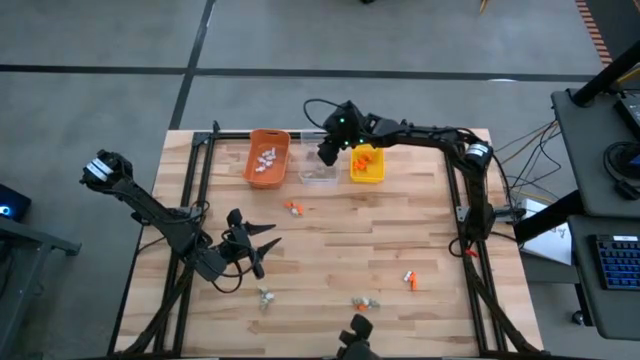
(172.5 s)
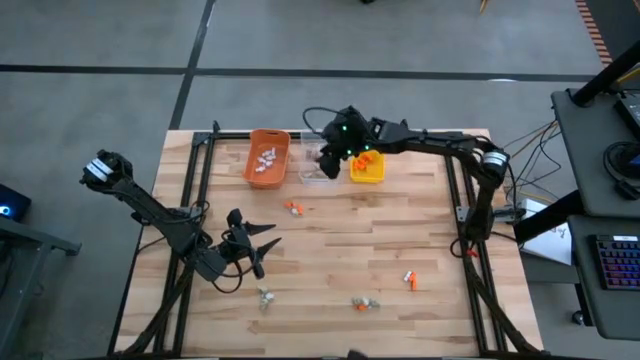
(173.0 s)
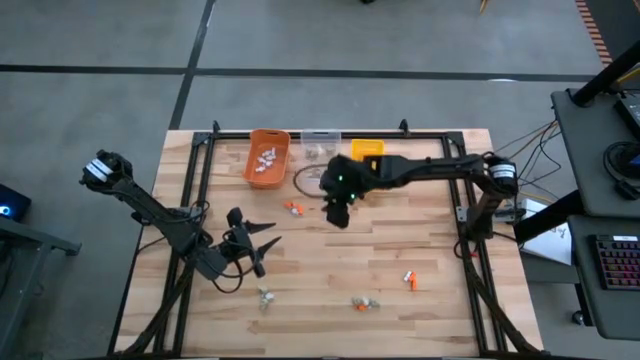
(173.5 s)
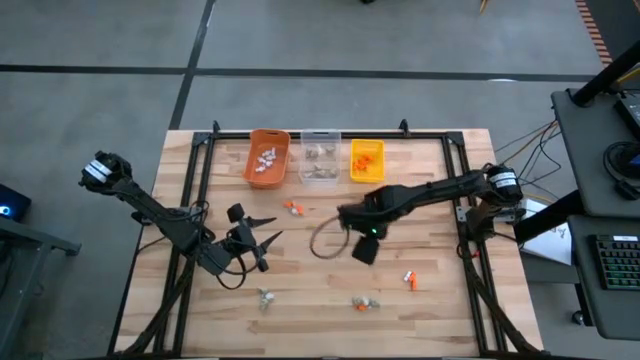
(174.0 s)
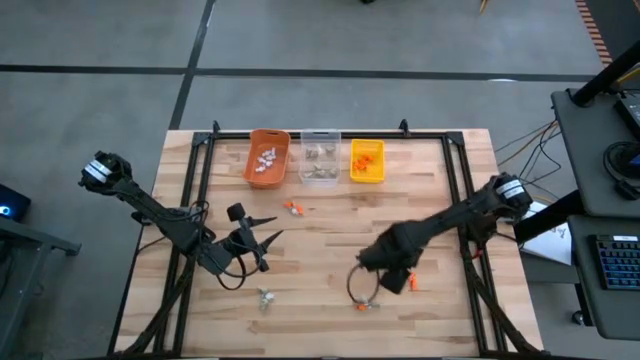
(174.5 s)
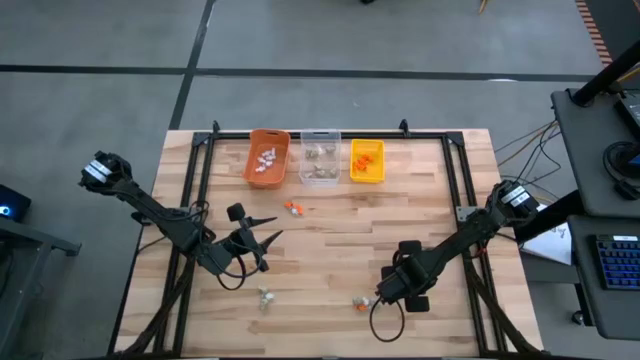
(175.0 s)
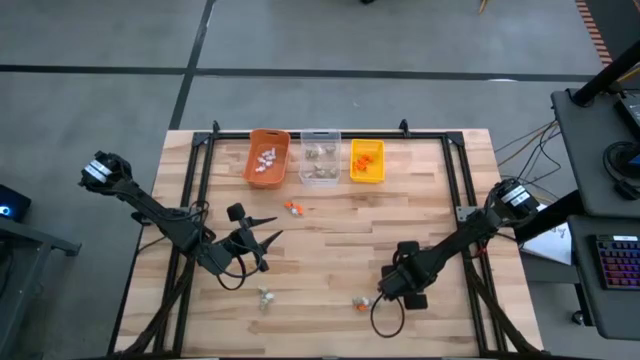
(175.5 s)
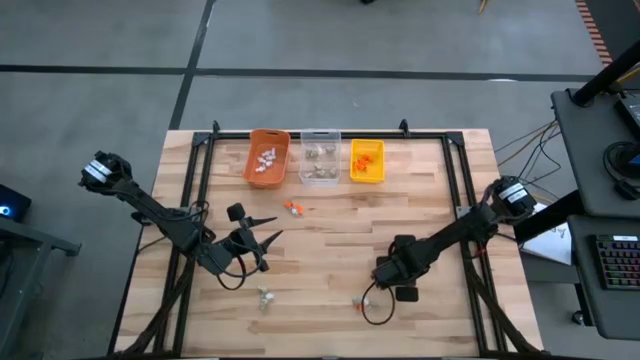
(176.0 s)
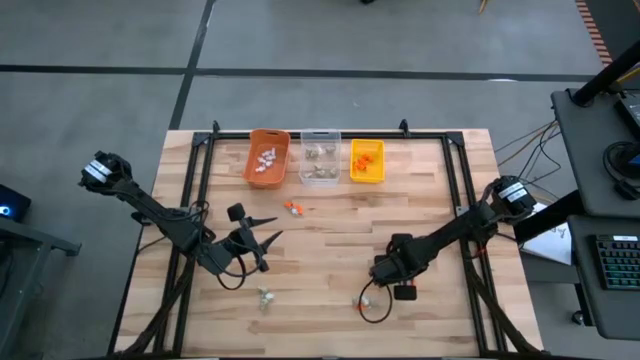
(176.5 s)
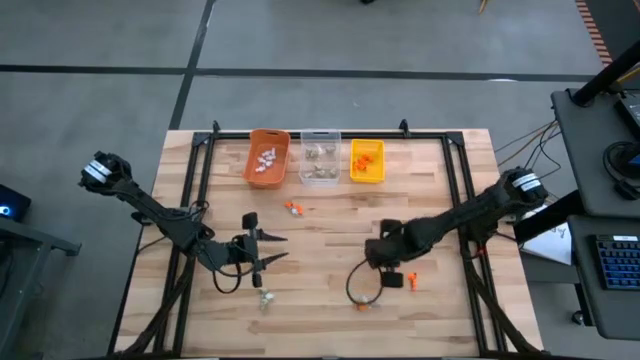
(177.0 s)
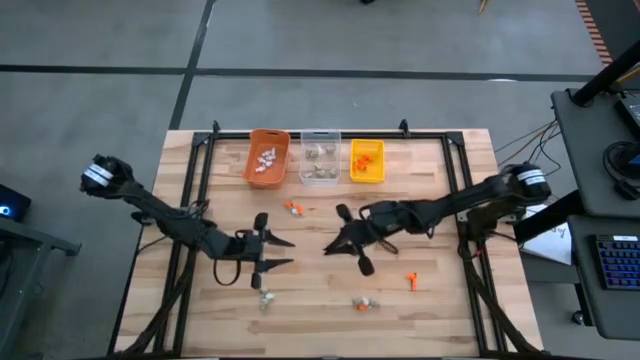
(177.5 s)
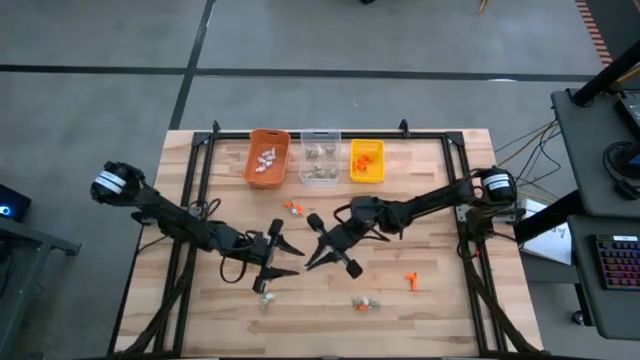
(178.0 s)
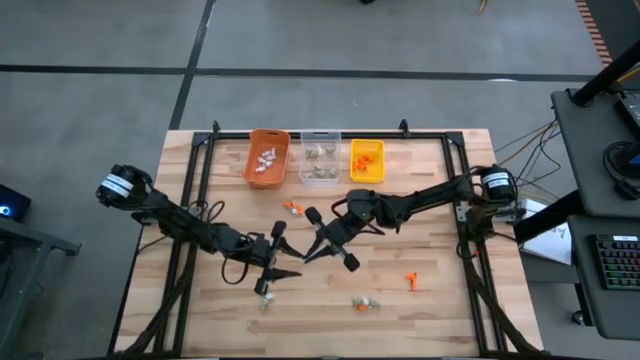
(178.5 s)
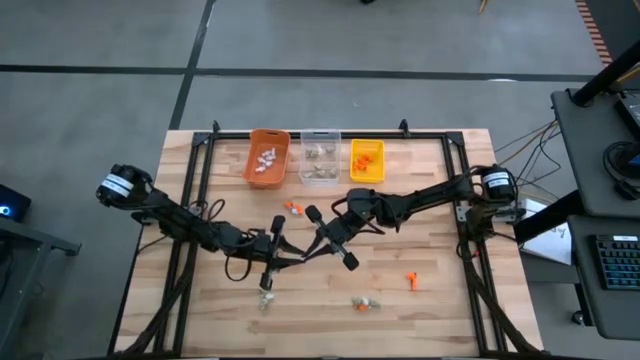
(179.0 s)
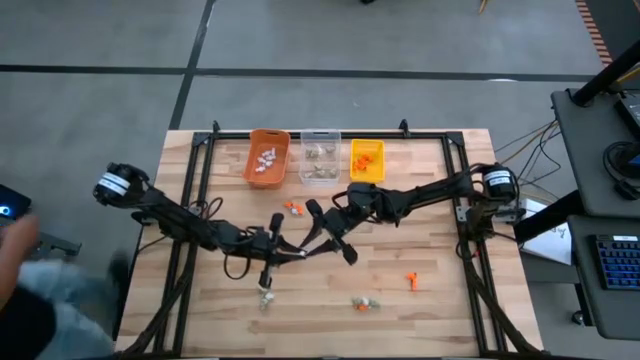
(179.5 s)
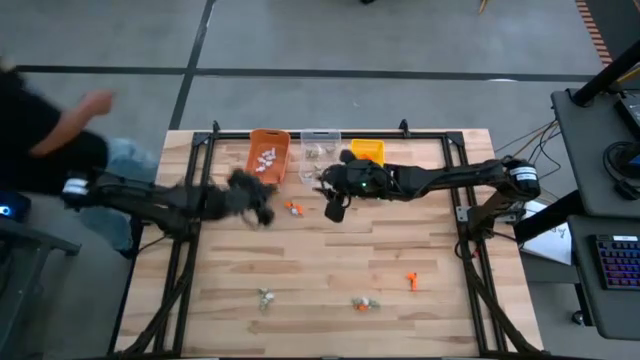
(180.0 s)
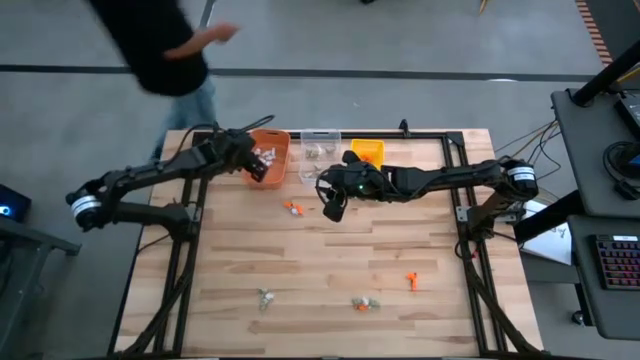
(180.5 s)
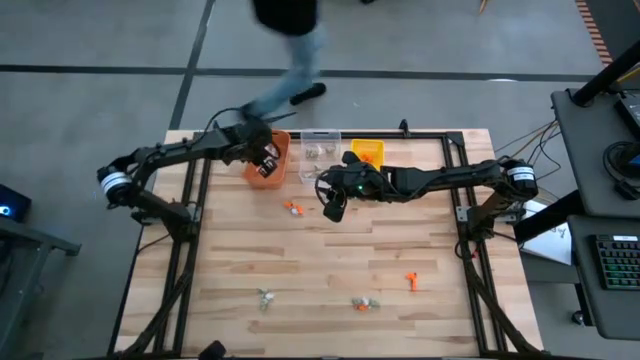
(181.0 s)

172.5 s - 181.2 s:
Task: Sort Halloween decoration
Put the white skeleton toy into the orange bin

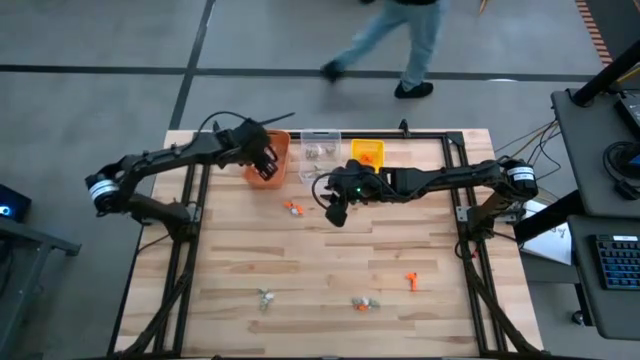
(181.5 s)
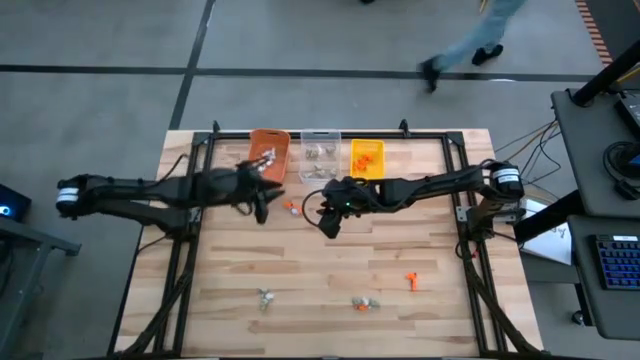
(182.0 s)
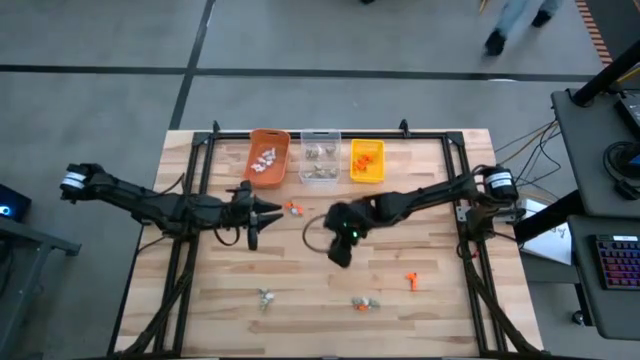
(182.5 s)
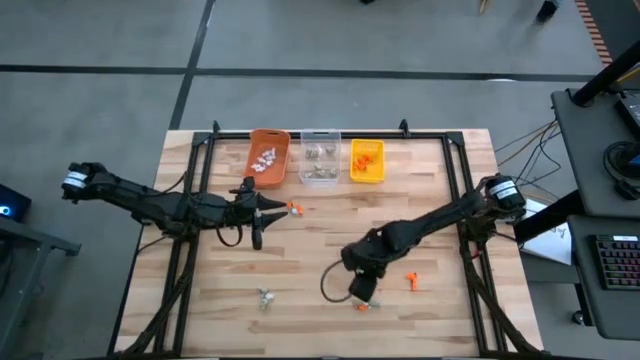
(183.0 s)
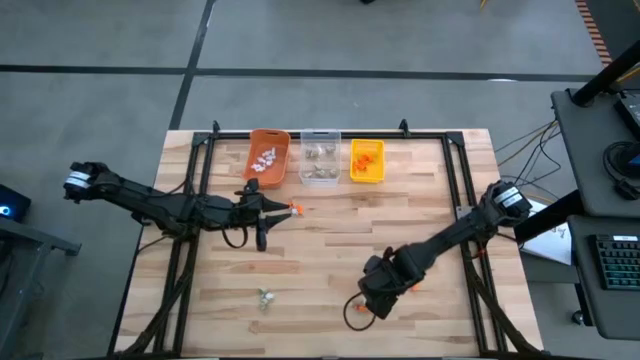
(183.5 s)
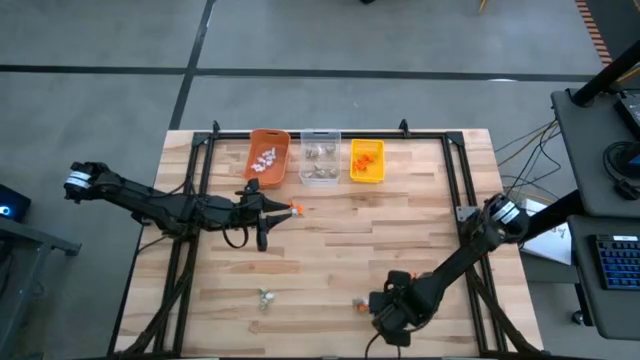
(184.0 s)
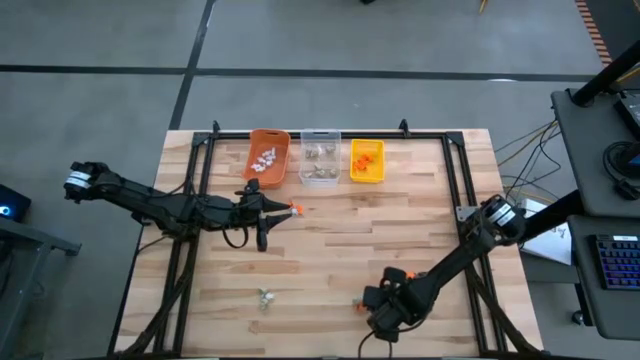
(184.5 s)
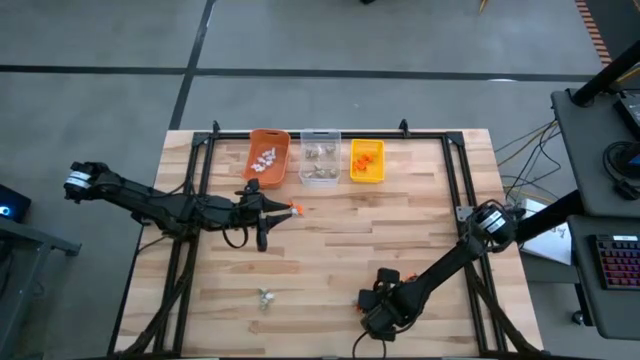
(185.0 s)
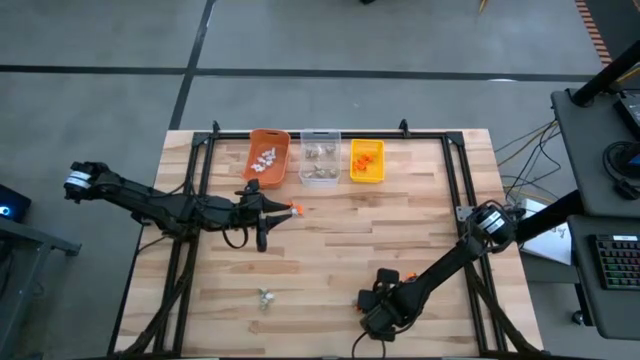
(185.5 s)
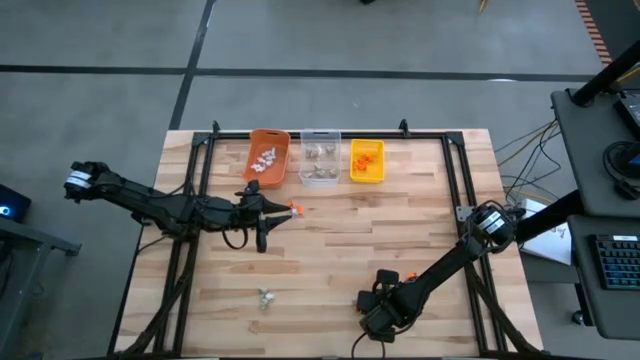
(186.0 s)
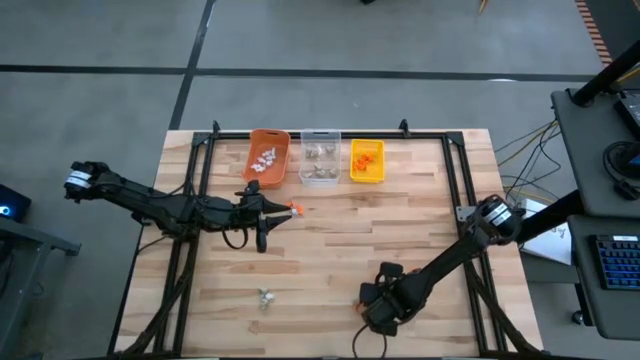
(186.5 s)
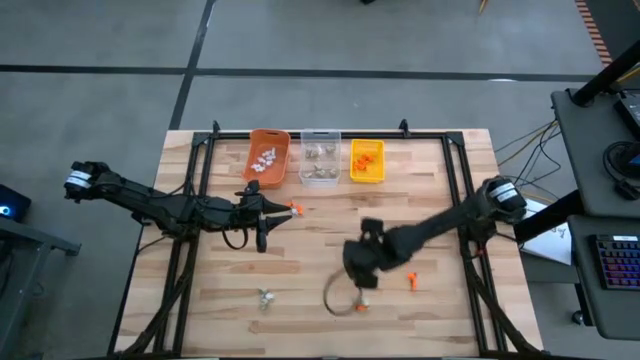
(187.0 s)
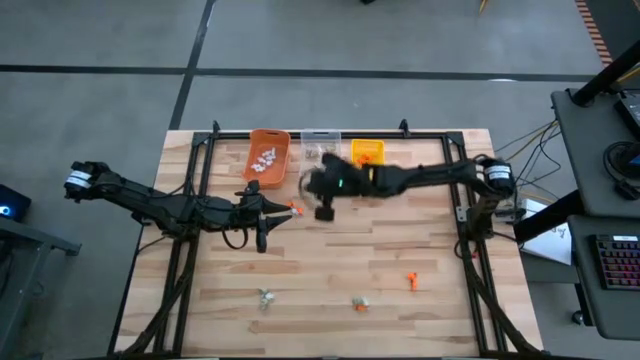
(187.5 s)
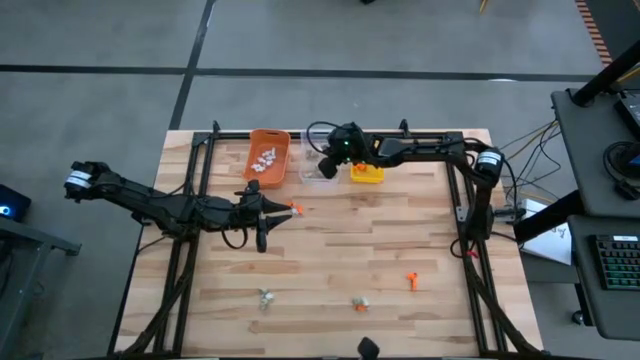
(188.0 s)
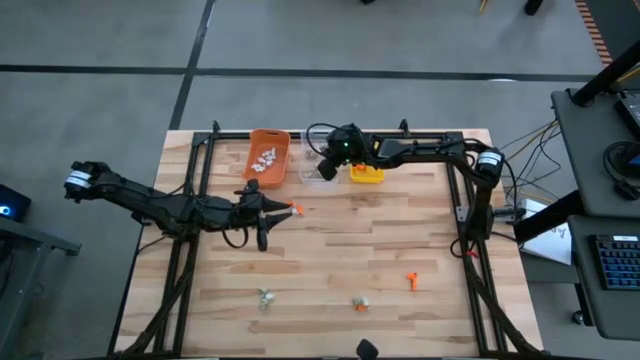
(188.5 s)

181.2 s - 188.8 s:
Put the gray skull toy into the transparent bin

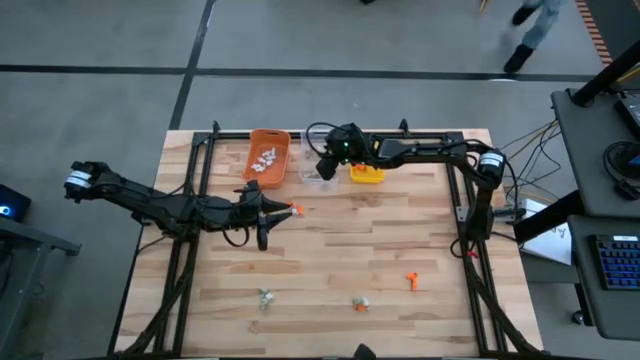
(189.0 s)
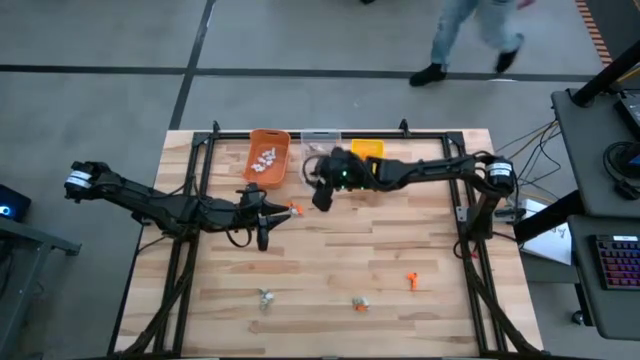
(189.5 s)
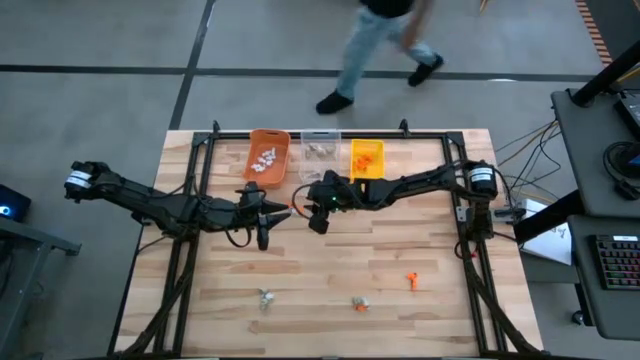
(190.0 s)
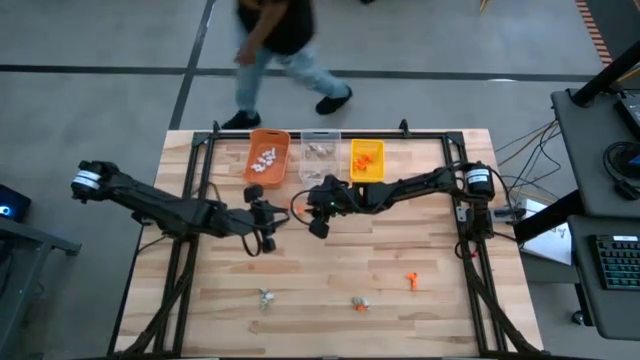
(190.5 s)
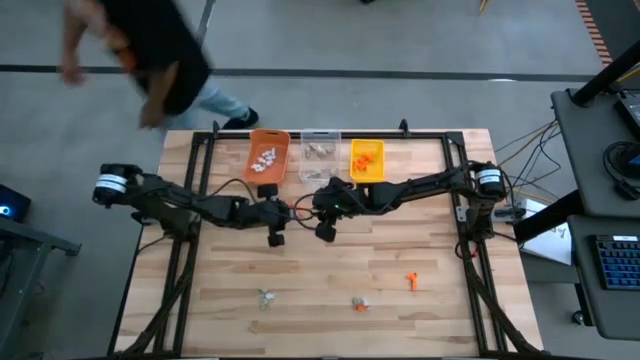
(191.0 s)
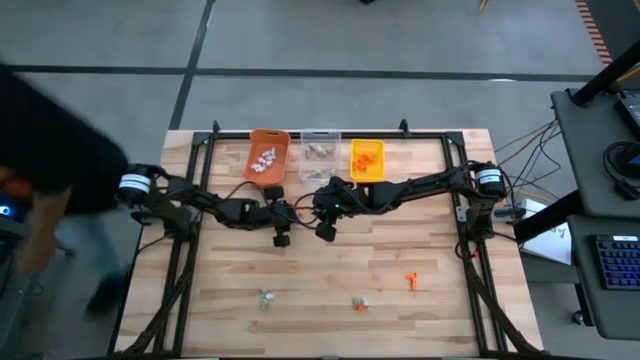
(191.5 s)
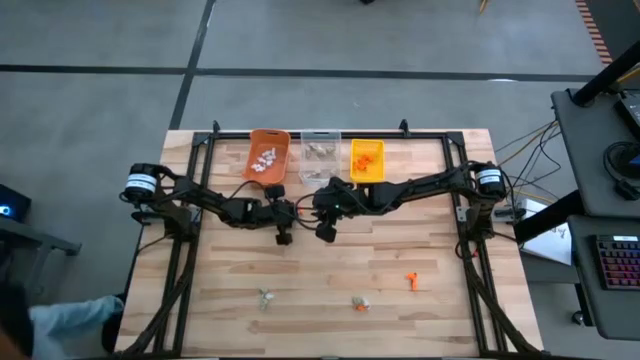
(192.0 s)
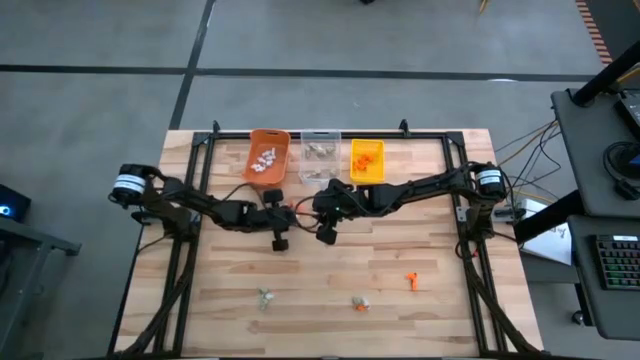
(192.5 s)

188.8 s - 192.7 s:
Put the white skeleton toy into the orange bin

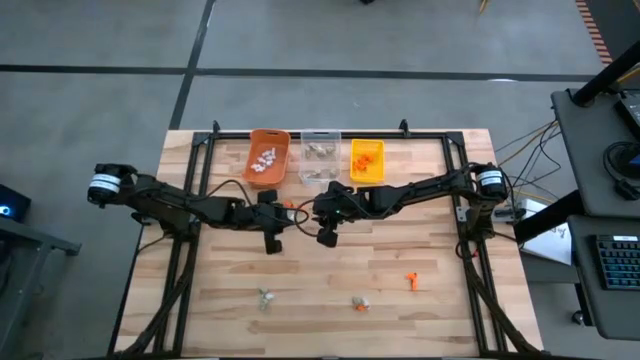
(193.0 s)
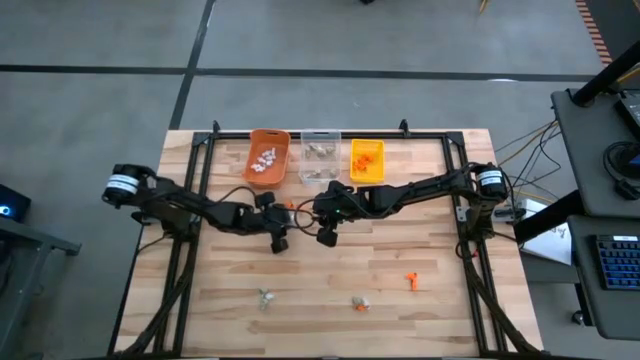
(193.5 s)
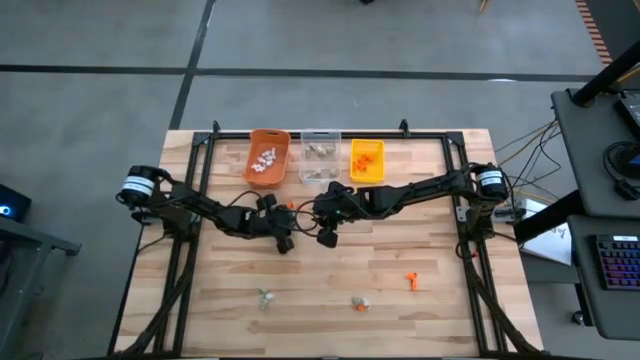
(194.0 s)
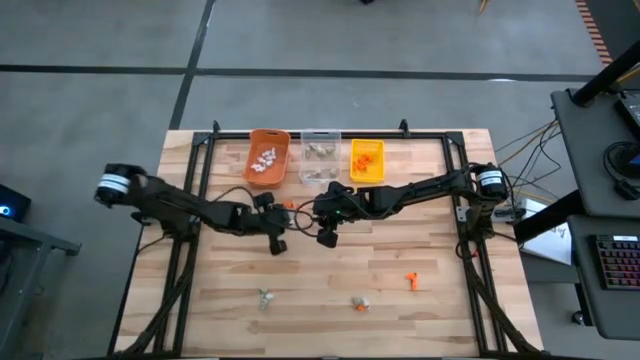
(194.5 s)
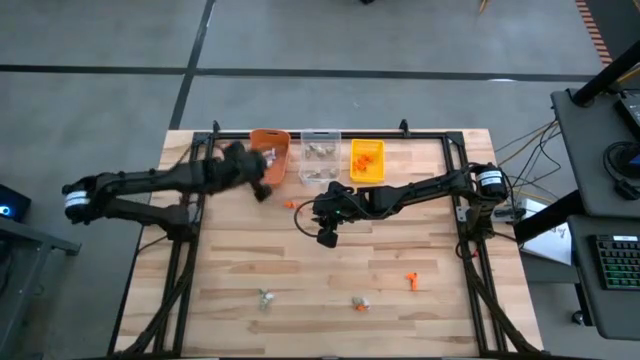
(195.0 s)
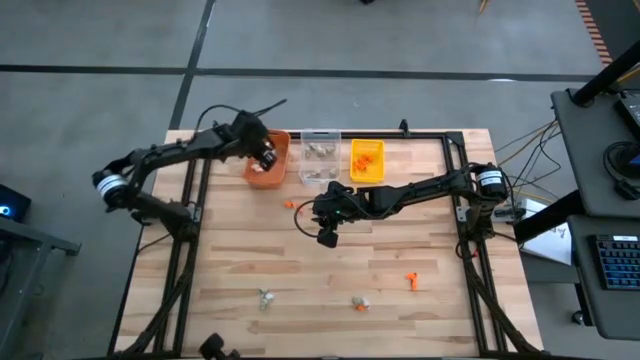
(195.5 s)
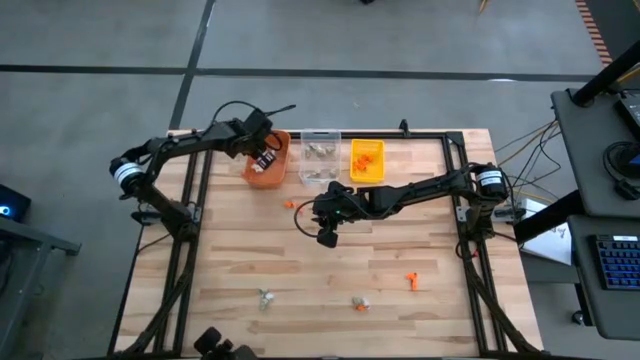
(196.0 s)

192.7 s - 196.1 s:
Put the white skeleton toy into the orange bin
